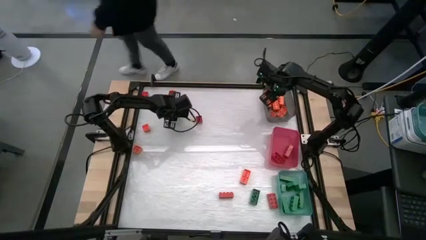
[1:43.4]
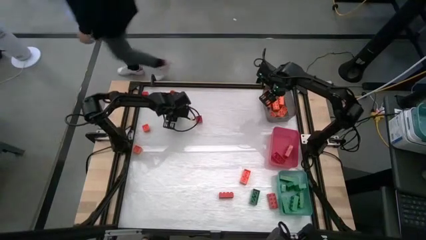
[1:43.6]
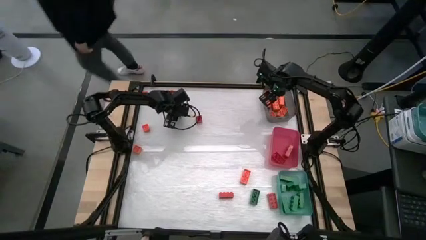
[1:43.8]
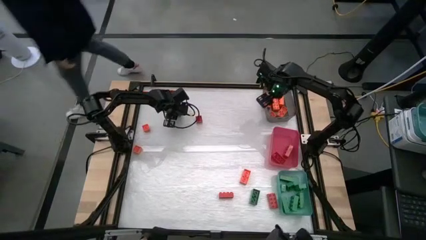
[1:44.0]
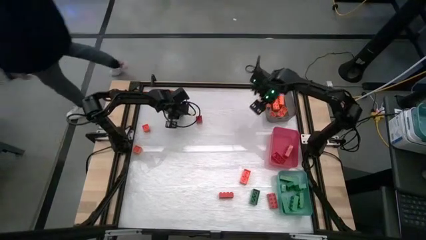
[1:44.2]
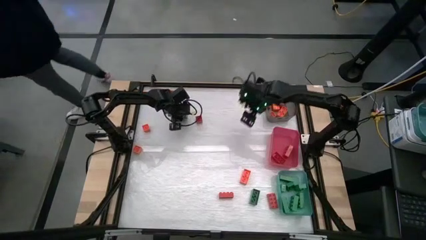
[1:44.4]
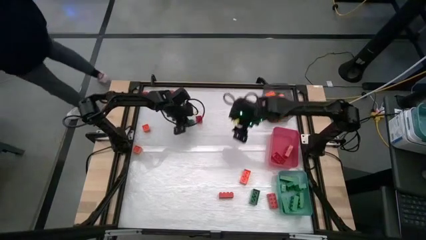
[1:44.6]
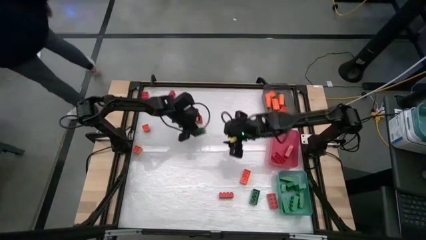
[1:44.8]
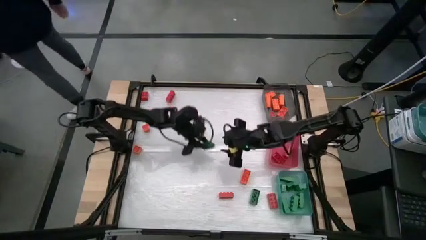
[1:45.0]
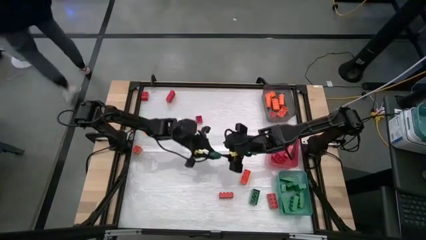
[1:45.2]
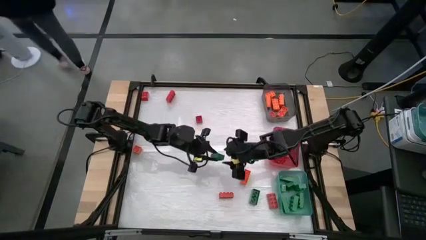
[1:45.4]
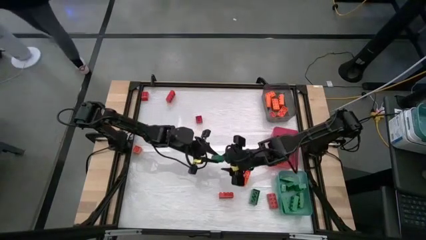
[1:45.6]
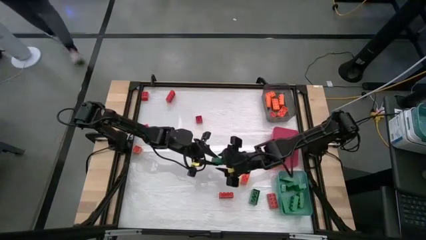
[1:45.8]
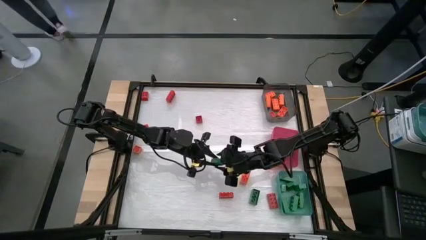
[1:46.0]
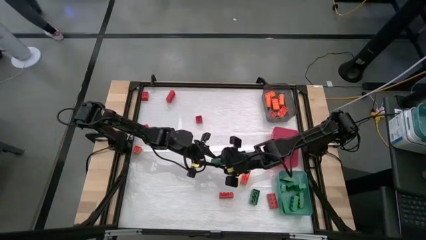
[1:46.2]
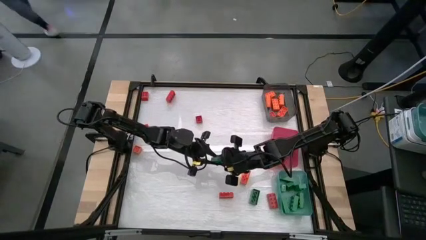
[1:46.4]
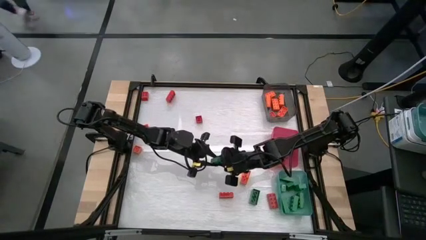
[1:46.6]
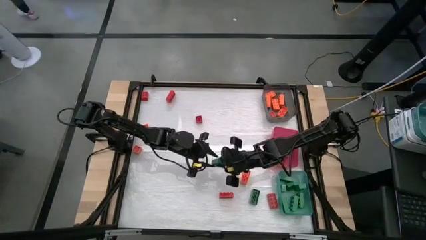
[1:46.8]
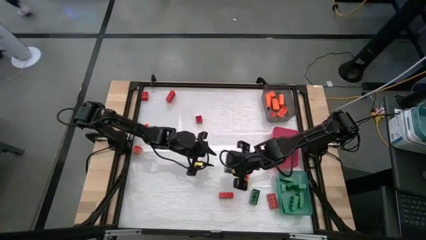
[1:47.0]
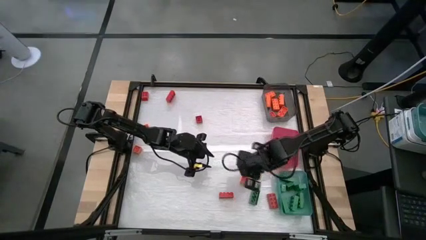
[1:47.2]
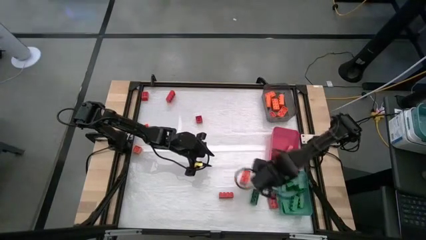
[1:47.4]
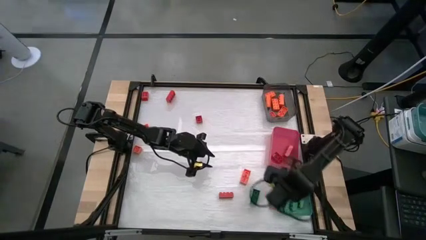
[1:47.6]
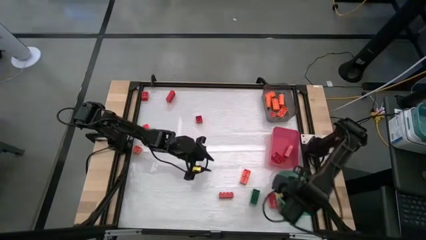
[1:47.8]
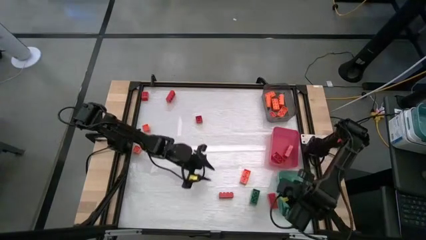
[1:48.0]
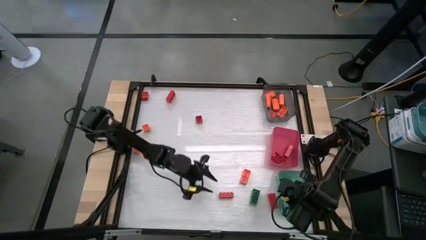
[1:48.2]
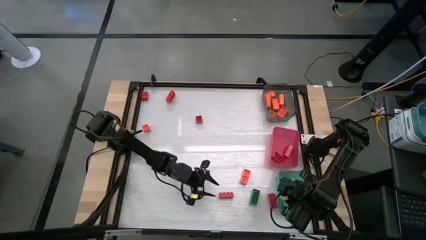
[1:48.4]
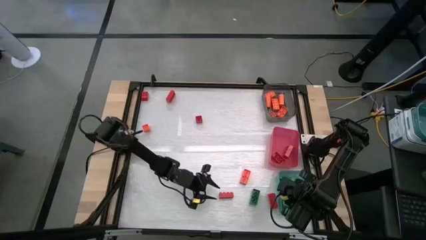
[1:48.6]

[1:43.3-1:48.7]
Task: Sort blocks
Put the green game piece into the blue bin

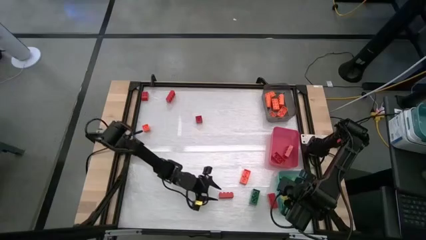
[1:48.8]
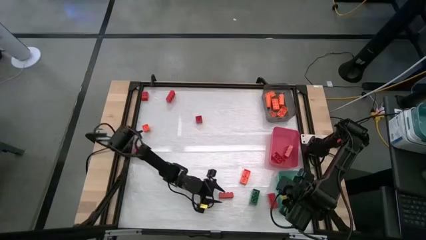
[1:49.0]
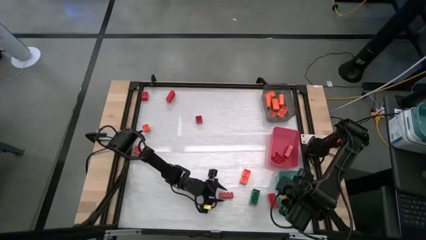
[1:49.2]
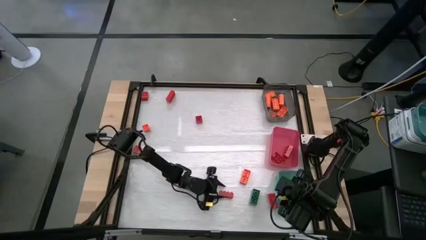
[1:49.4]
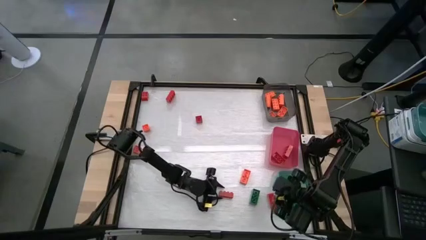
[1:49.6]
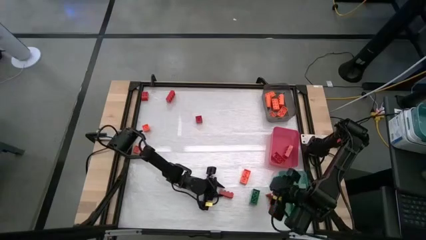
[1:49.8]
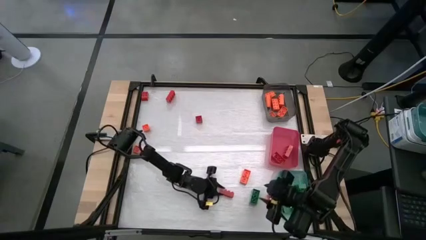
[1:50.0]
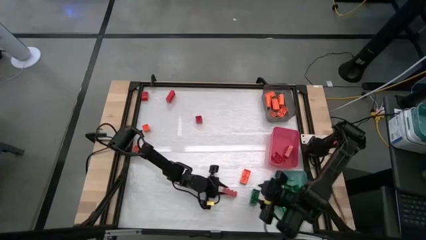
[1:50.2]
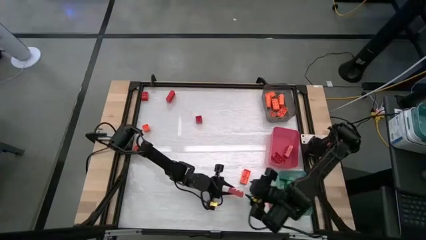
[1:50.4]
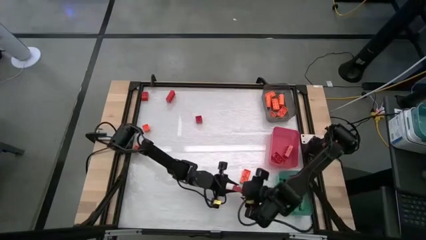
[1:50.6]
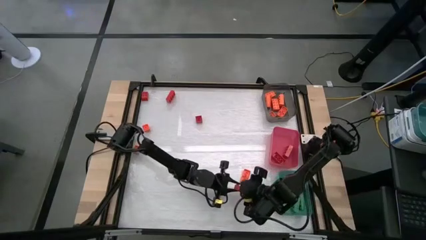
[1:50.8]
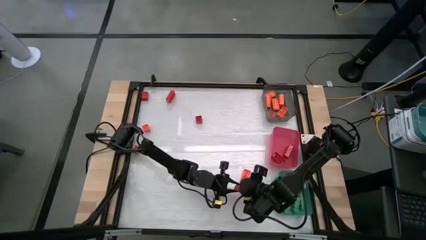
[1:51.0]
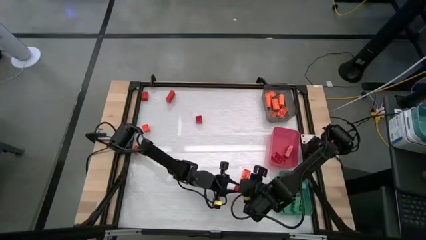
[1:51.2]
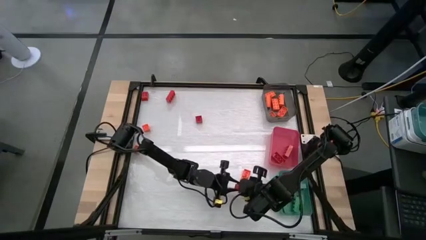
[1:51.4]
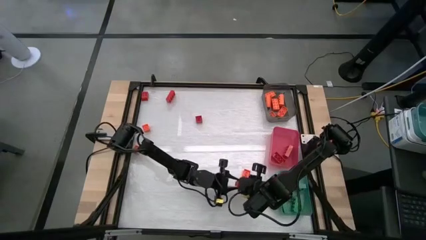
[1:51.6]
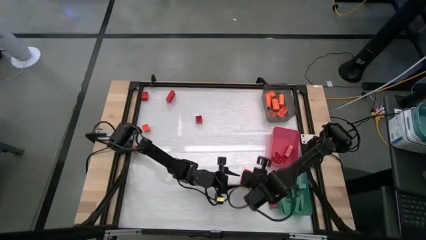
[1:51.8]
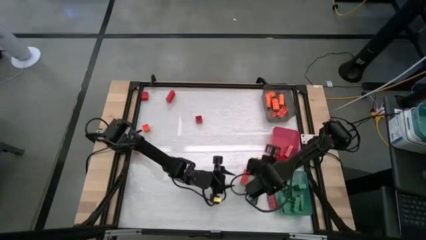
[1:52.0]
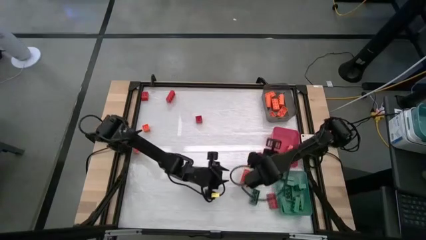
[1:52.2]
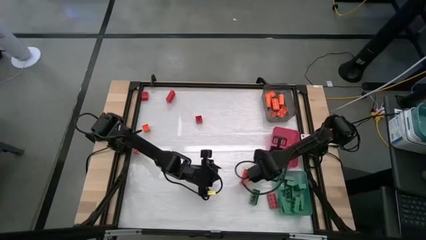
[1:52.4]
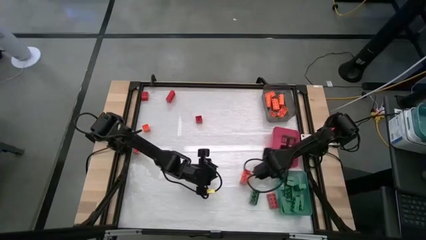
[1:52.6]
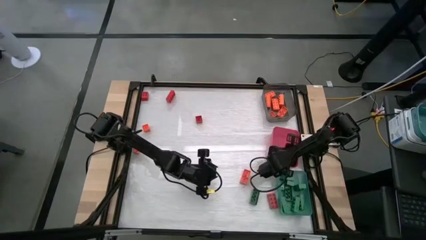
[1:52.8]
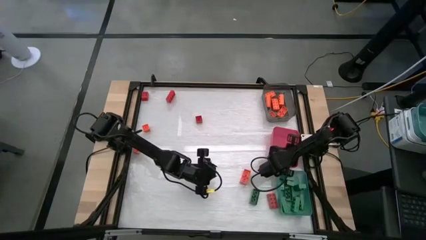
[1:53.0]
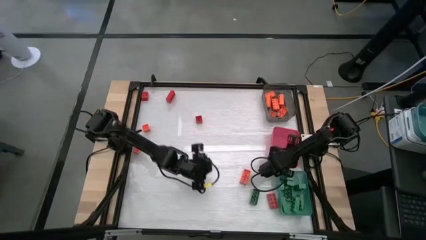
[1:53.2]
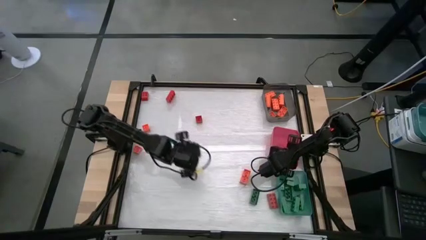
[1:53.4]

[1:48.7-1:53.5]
Put the green game piece into the blue bin

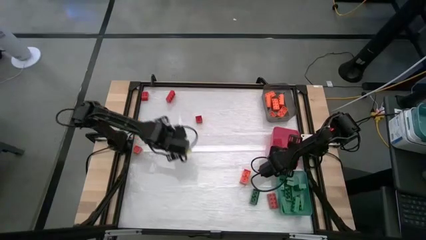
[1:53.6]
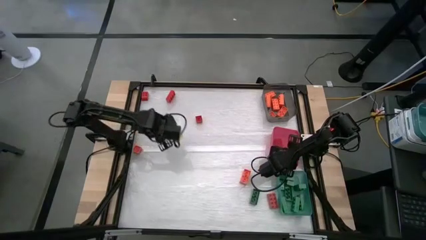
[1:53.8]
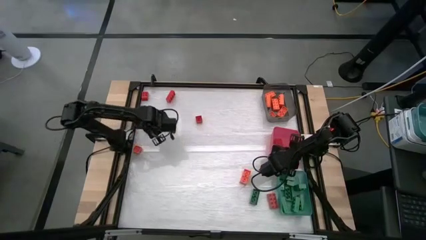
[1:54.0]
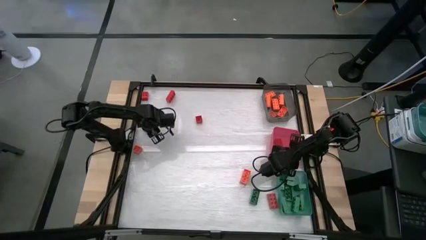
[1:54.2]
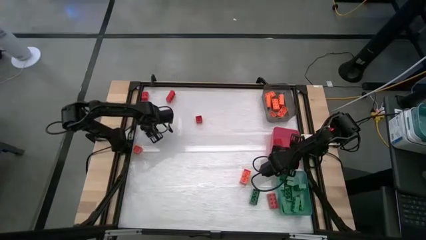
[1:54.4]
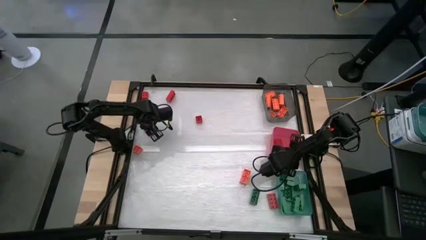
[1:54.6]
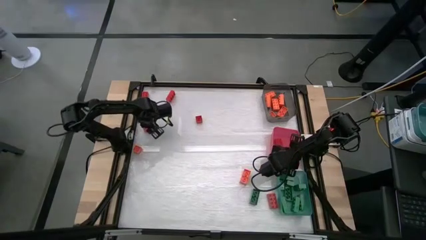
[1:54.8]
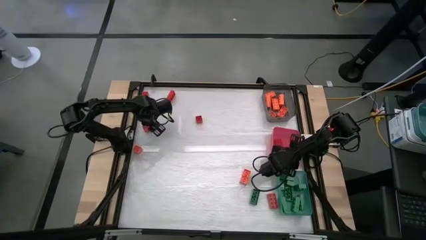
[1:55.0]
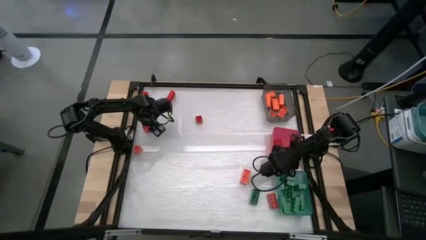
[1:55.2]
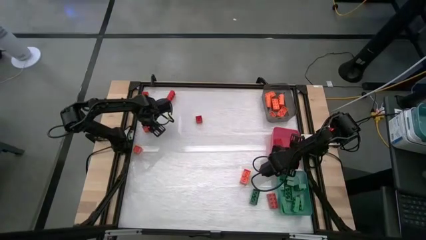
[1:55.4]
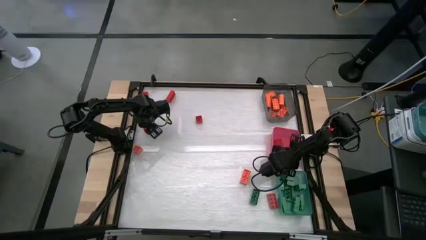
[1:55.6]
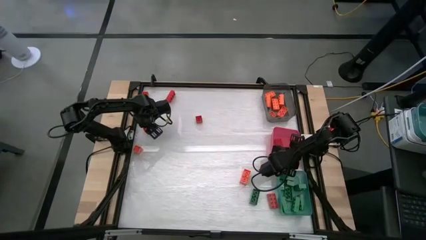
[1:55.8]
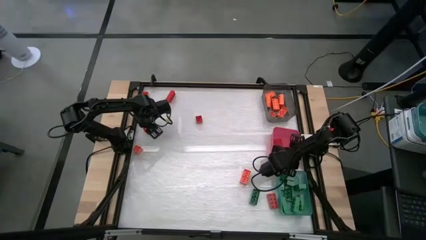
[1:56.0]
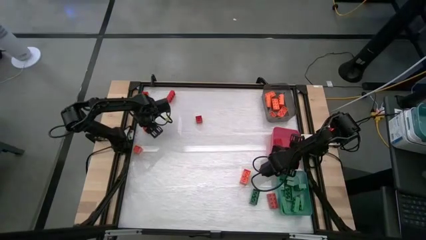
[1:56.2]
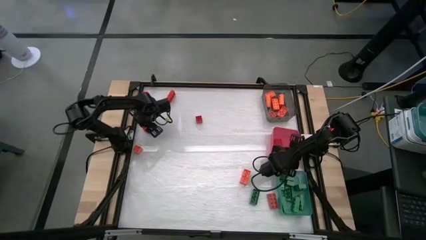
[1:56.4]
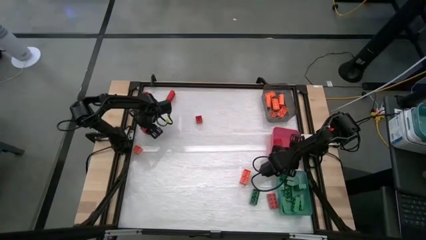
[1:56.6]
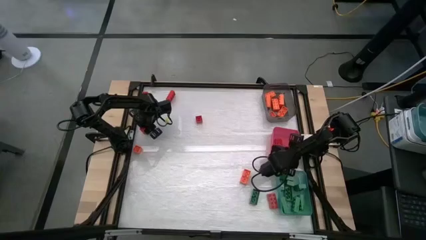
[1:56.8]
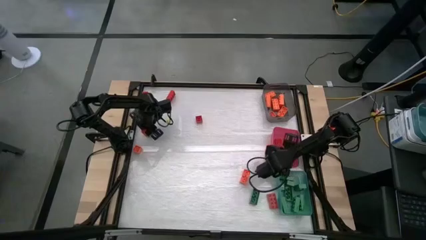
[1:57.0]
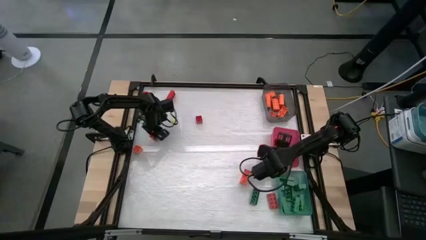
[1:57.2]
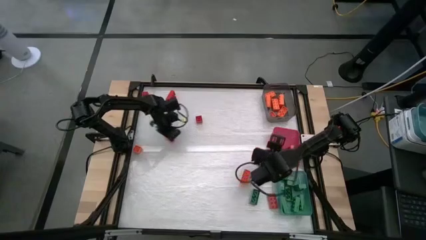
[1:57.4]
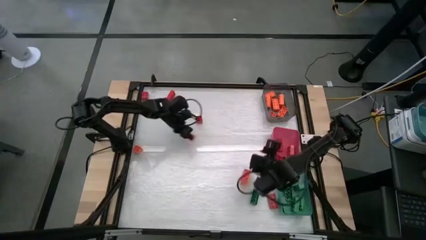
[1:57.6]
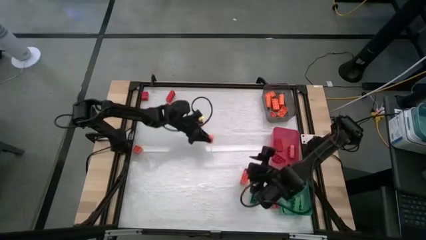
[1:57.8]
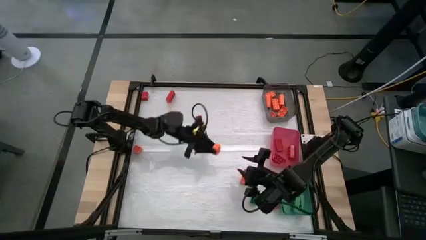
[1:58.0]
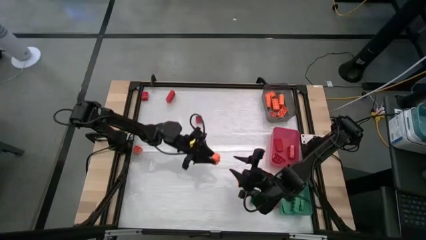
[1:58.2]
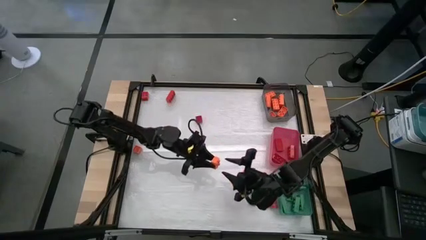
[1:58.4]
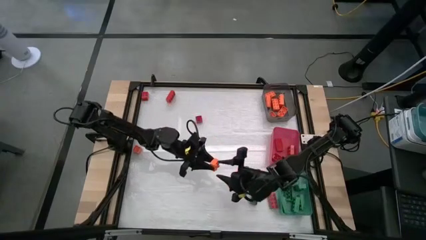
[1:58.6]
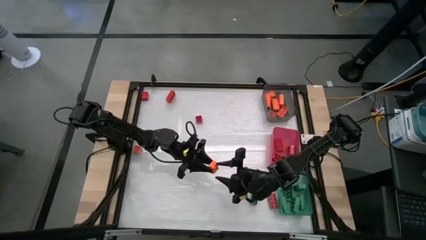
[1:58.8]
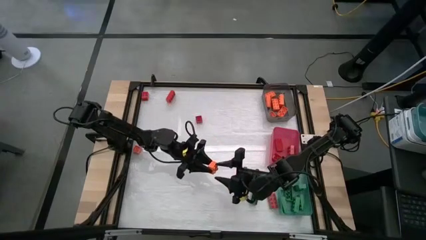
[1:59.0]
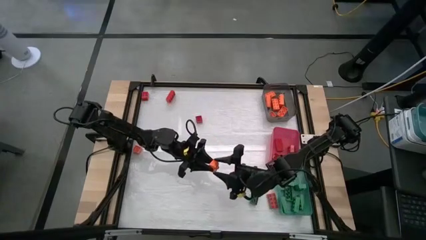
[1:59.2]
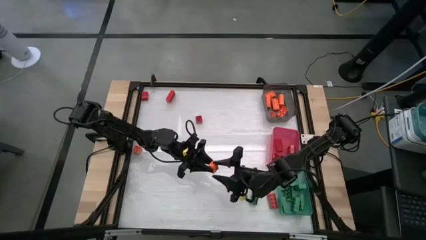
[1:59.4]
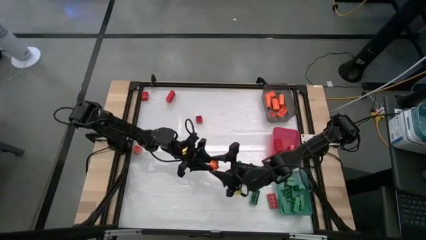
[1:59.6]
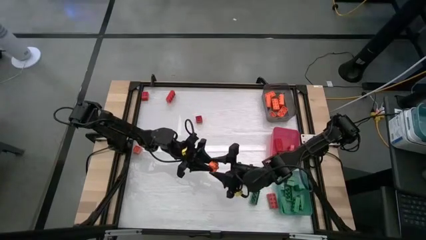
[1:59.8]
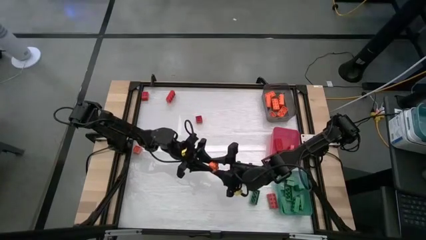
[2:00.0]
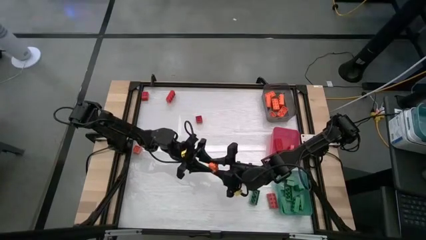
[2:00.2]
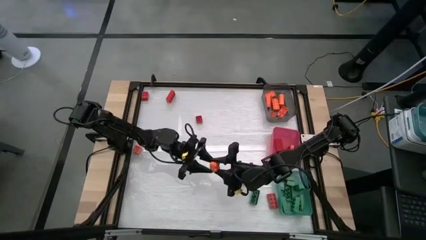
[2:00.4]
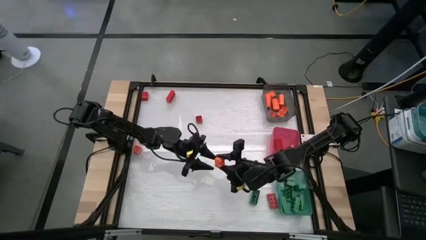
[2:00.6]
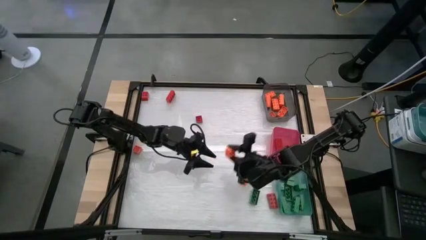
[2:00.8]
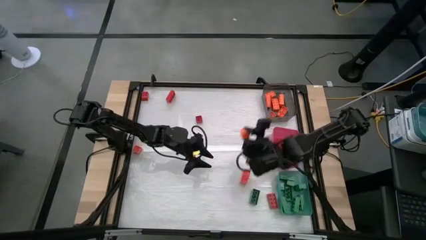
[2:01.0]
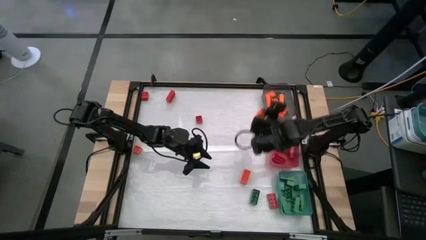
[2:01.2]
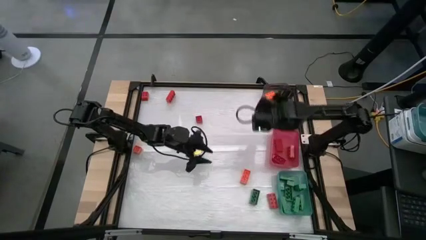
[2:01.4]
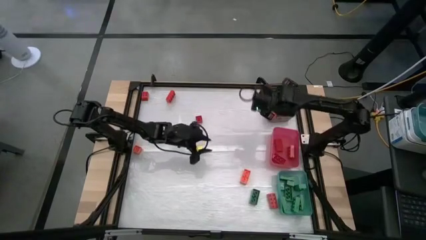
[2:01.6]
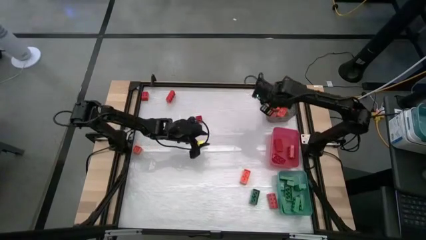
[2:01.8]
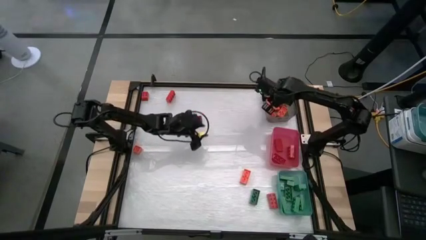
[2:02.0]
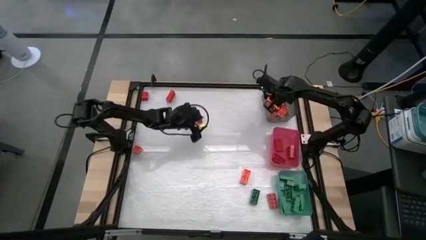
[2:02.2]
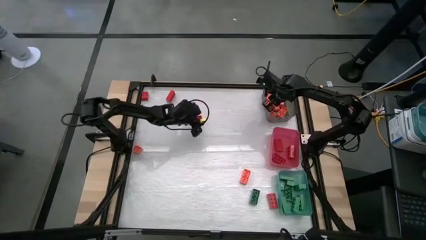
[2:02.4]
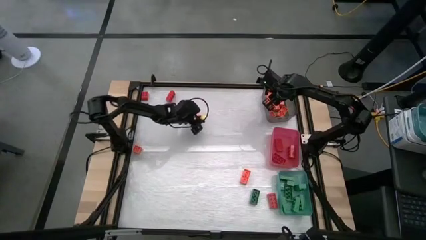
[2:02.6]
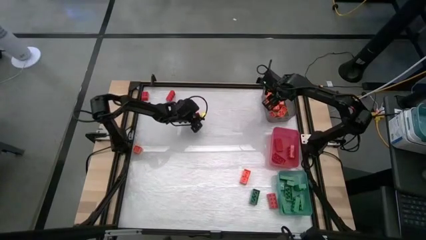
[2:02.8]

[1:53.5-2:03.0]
Put the orange game piece into the black bin
